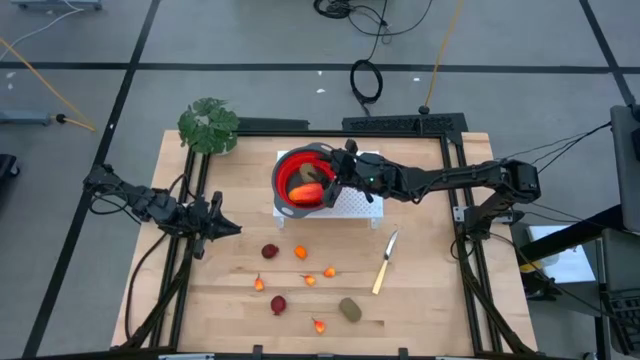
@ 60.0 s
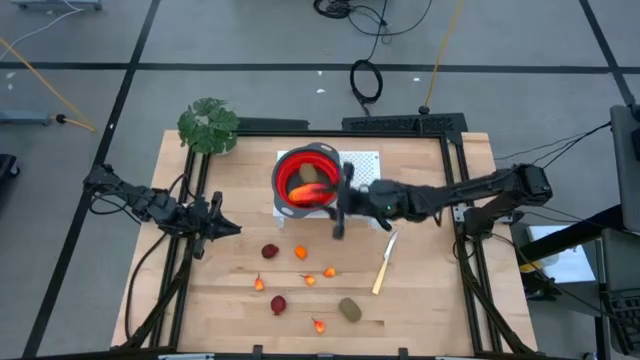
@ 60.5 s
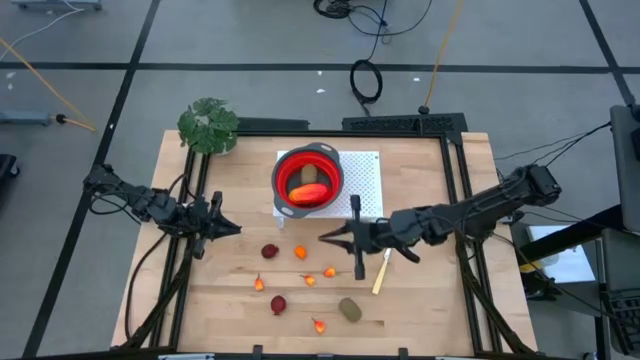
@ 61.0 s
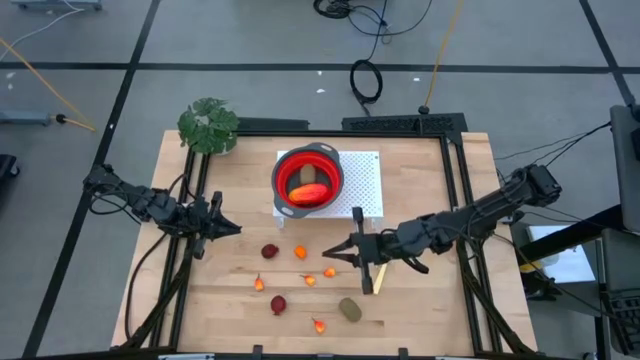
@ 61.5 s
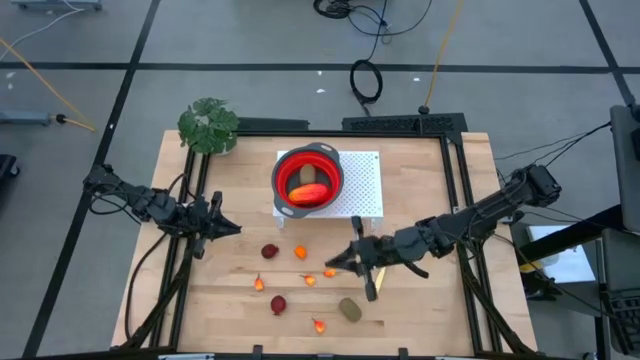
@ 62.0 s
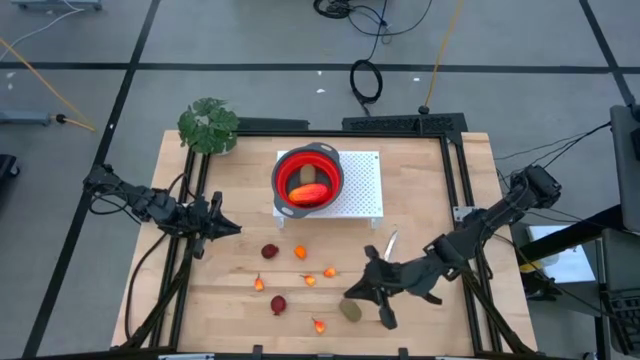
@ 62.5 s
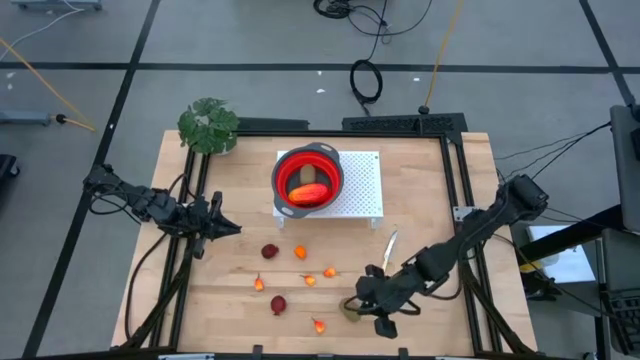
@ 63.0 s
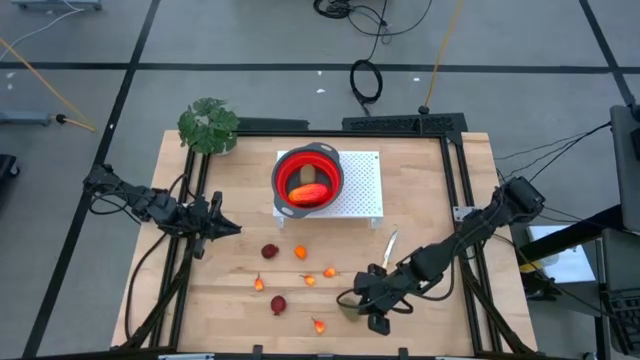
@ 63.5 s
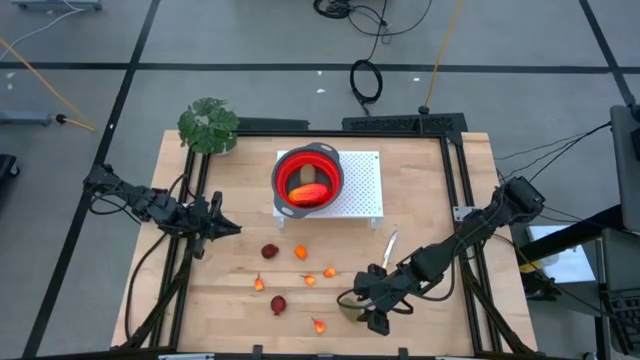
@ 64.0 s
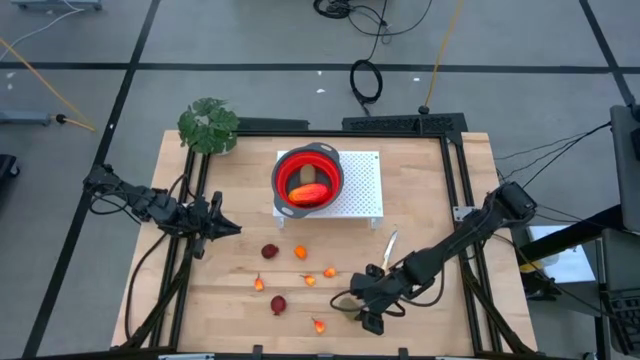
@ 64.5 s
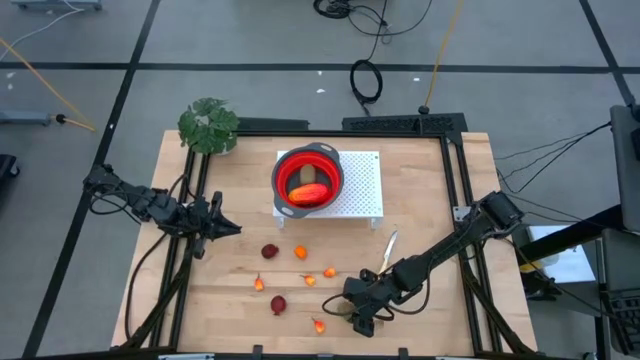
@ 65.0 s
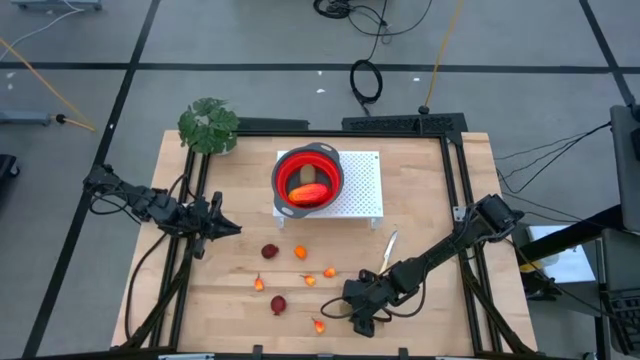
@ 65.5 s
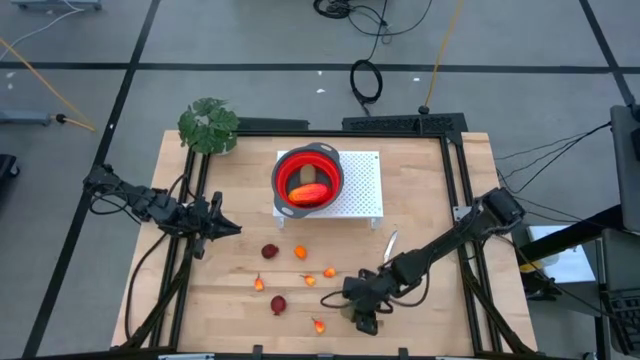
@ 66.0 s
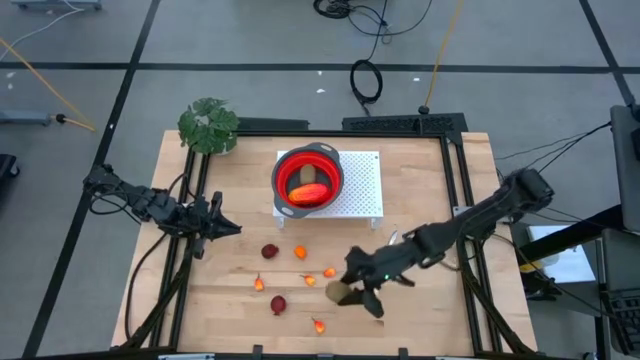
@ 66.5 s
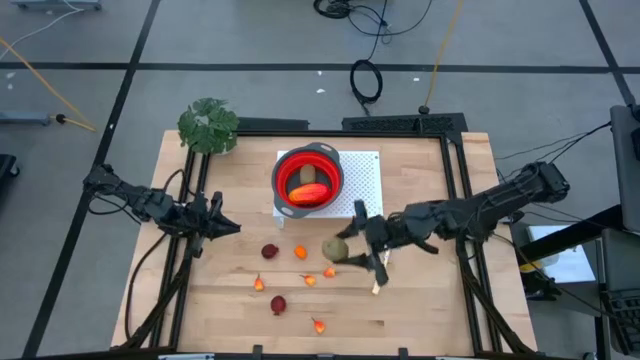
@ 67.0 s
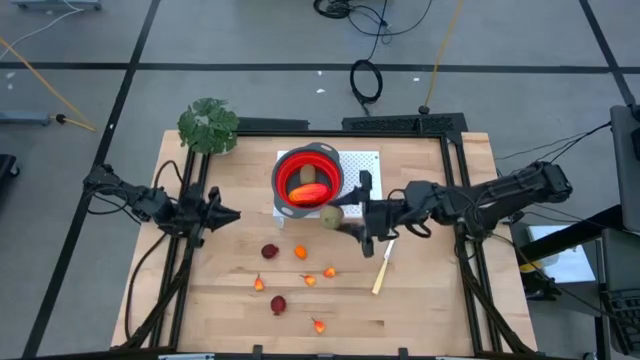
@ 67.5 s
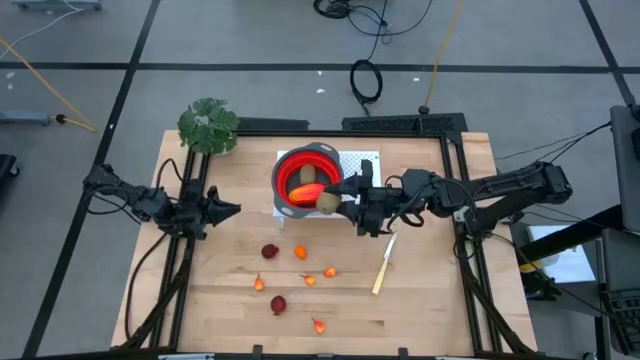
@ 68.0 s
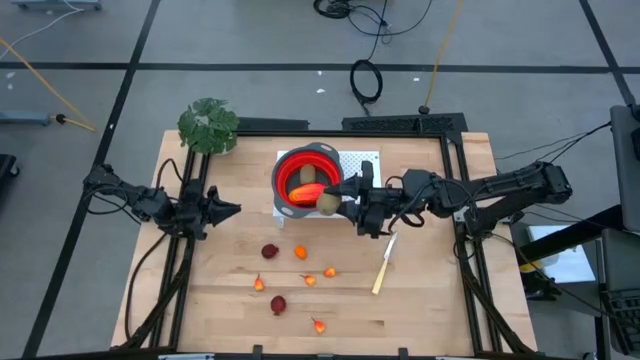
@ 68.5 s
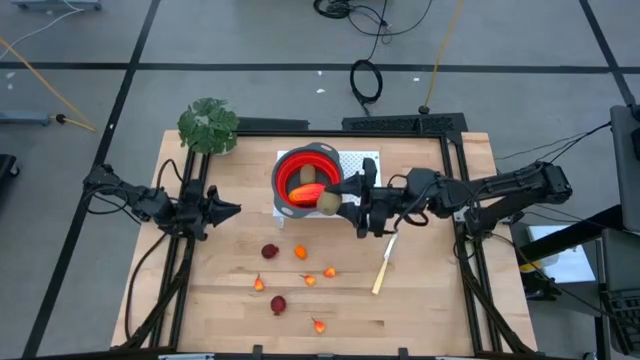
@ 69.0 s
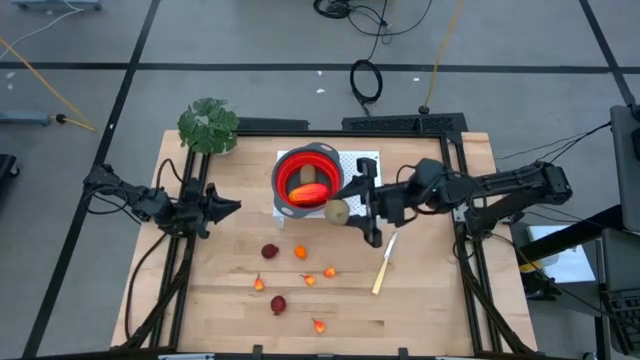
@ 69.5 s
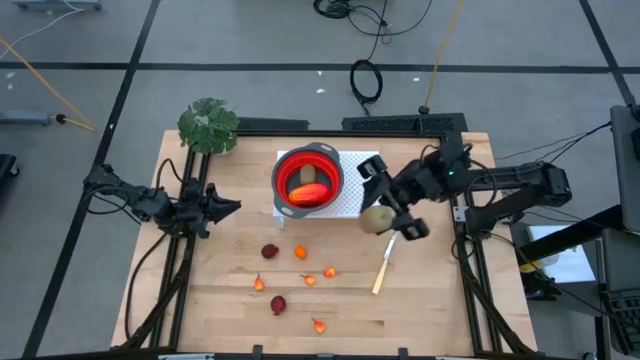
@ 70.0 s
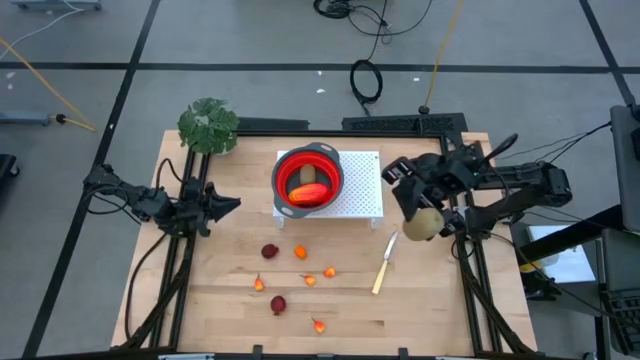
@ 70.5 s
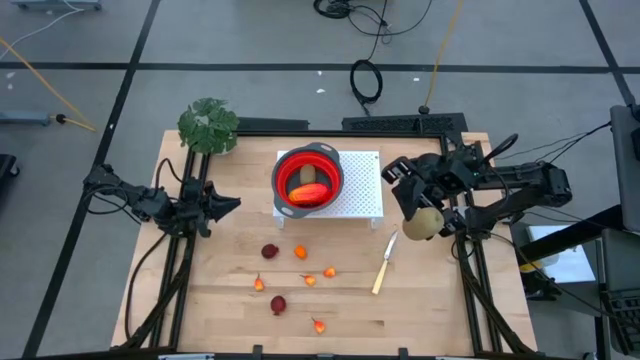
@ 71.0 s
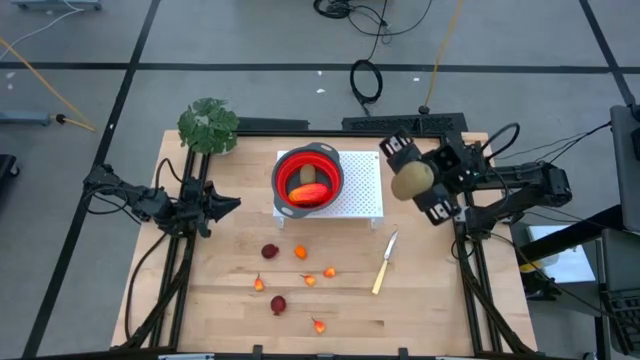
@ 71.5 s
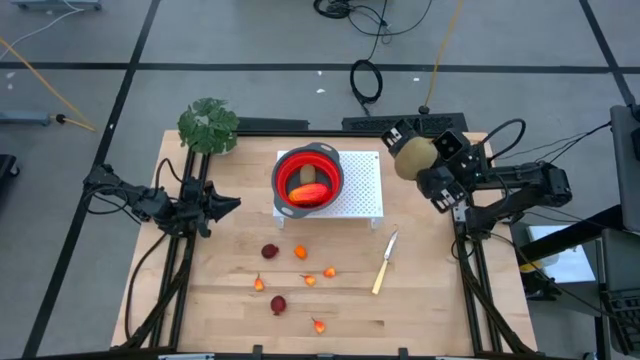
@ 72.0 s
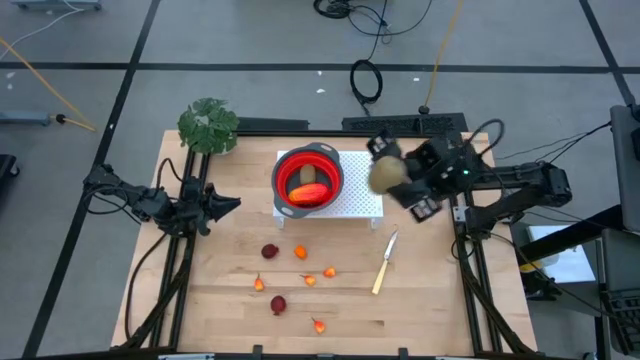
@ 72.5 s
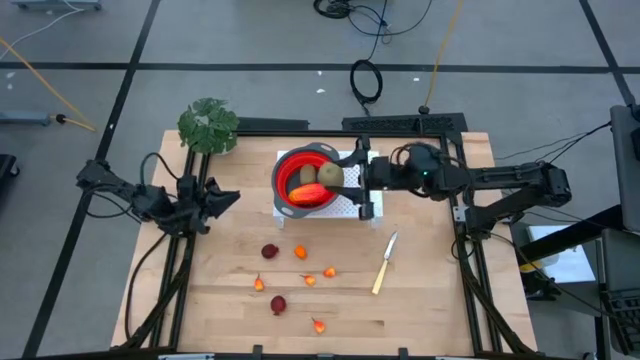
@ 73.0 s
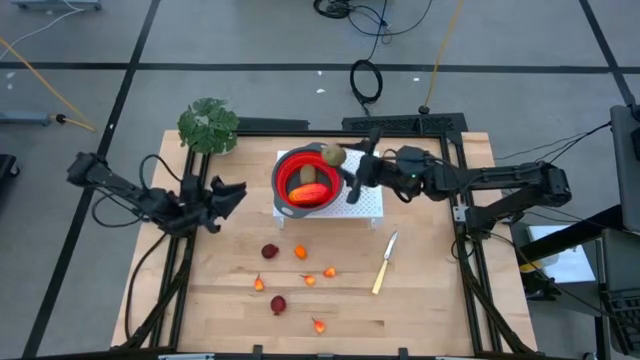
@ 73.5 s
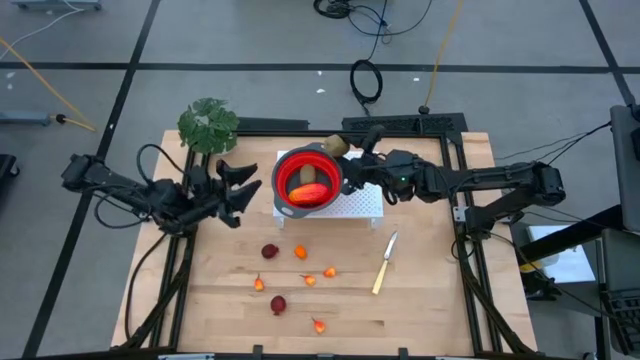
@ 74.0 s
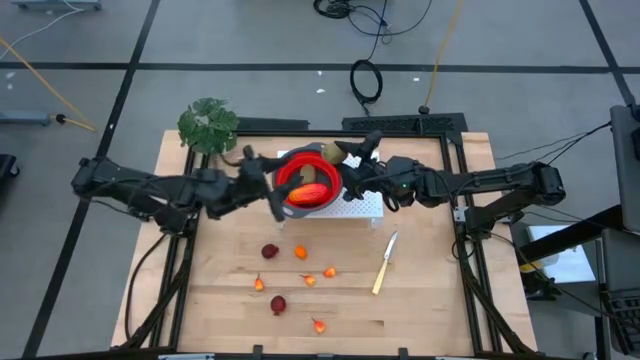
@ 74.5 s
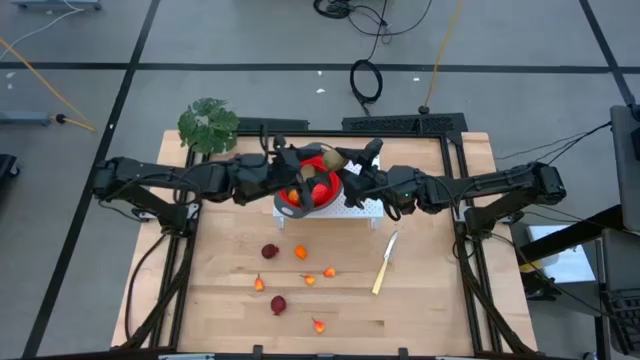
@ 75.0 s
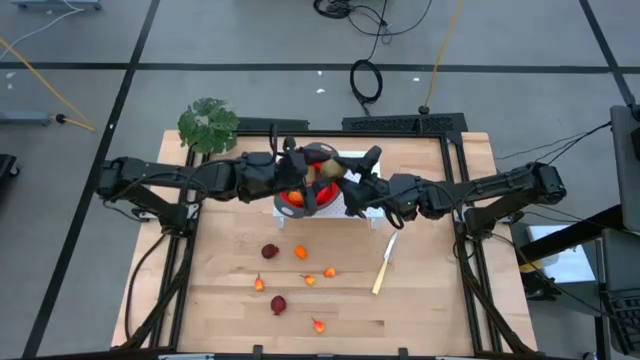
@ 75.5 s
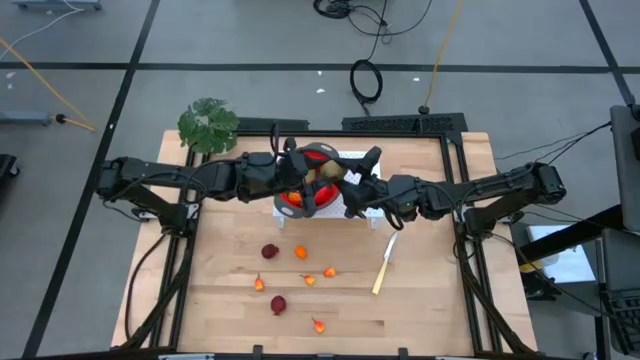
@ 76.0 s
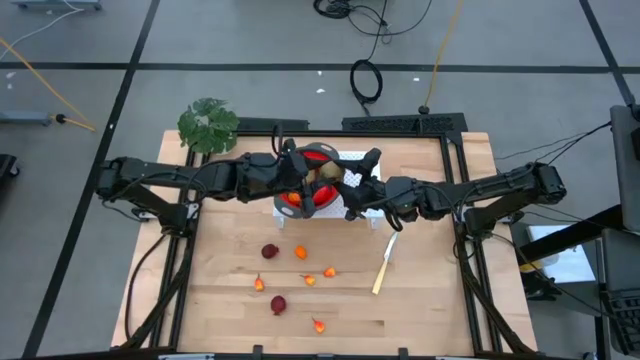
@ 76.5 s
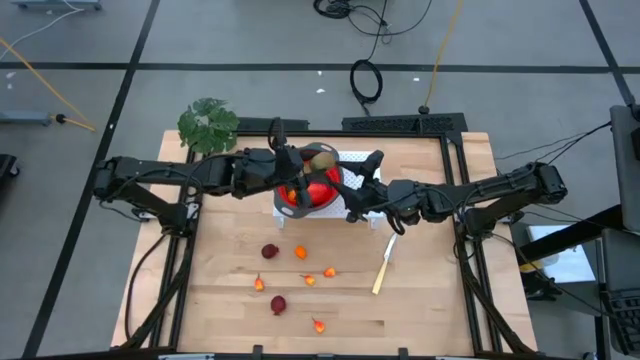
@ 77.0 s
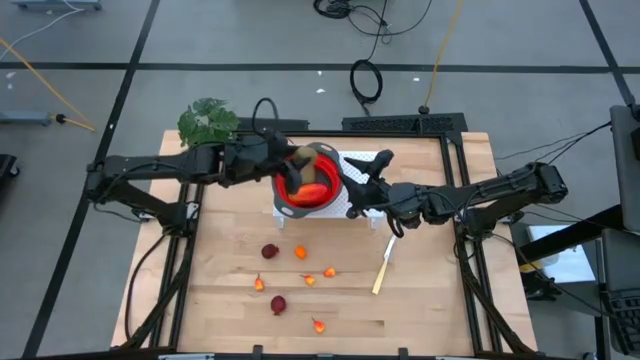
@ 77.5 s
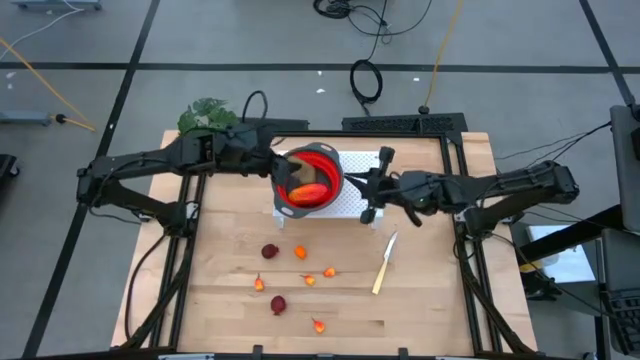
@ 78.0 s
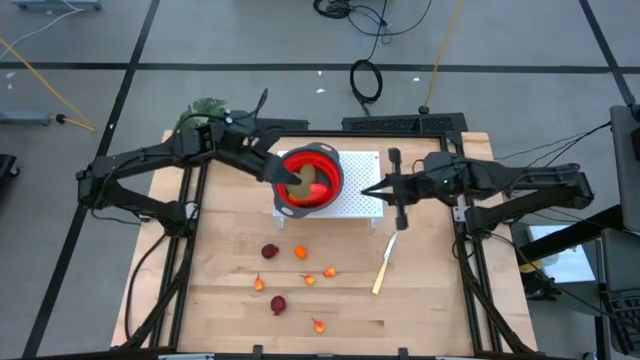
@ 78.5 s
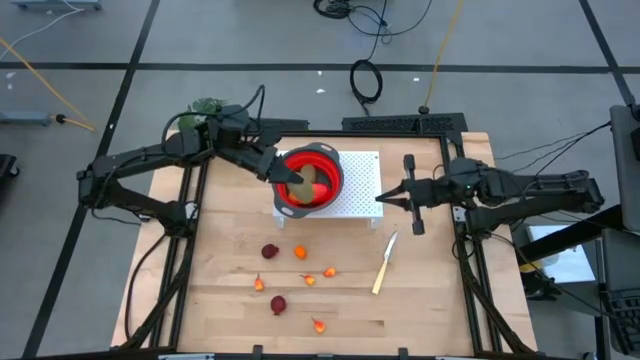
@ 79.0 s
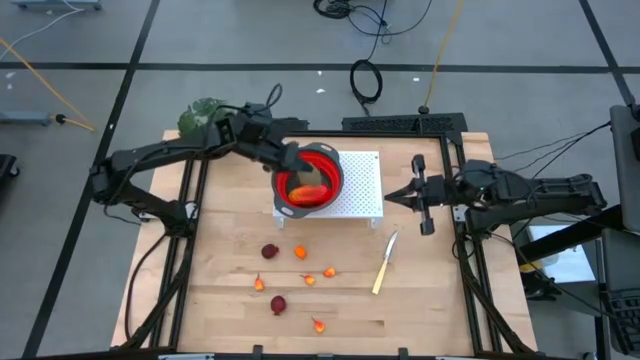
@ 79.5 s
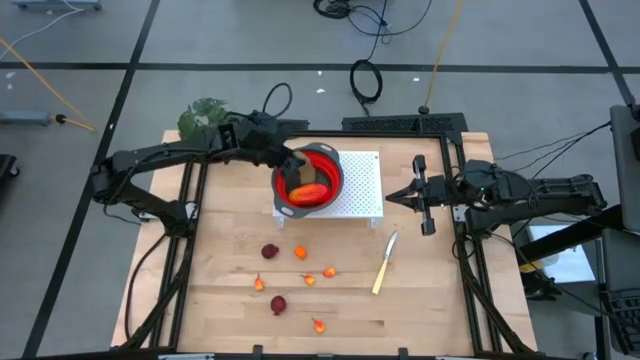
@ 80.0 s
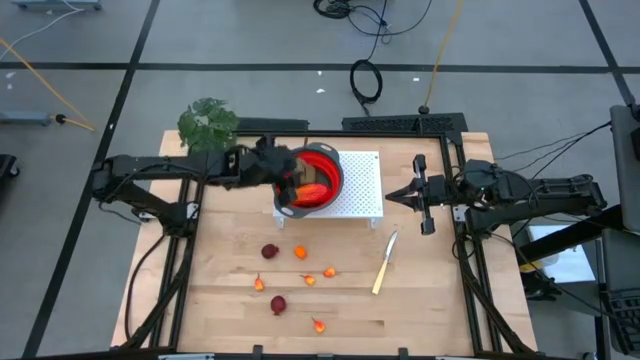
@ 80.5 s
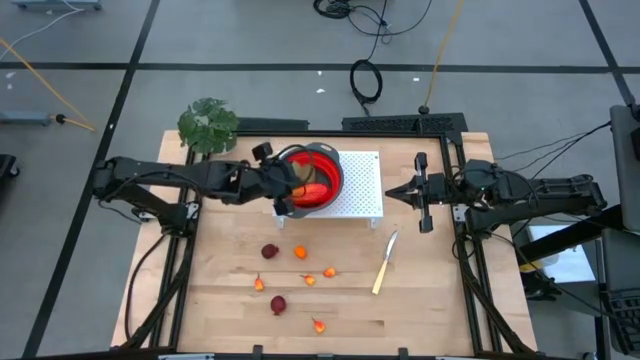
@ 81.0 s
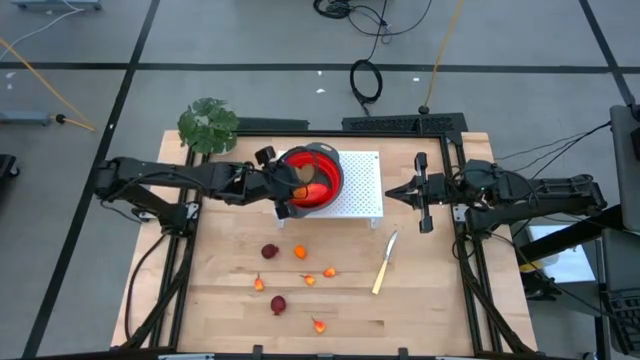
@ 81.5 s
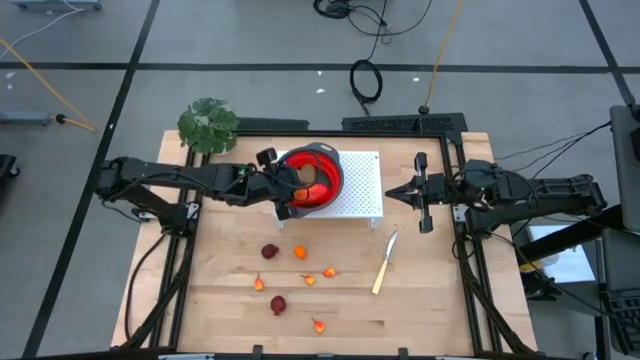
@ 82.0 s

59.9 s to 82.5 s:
Task: Pick & Place Fruit
Put the brown kiwi into the orange strainer bowl on the shelf
